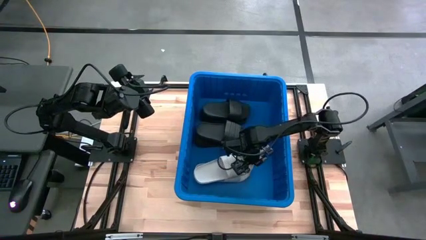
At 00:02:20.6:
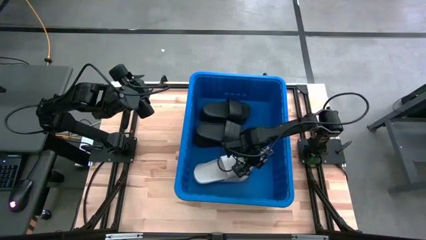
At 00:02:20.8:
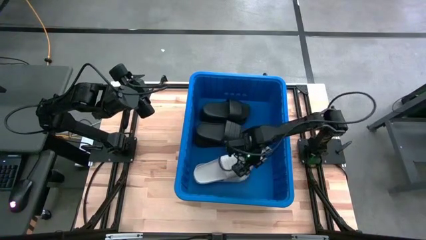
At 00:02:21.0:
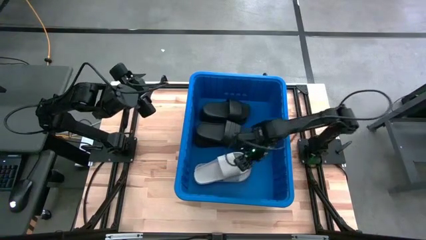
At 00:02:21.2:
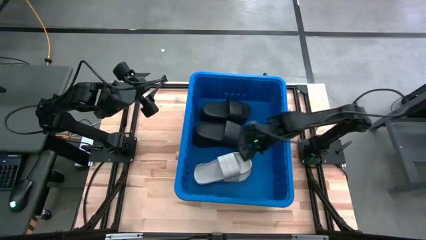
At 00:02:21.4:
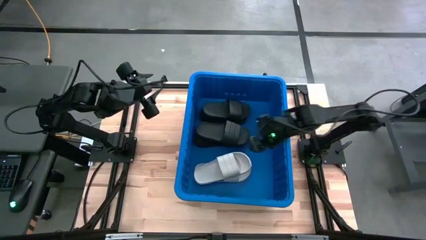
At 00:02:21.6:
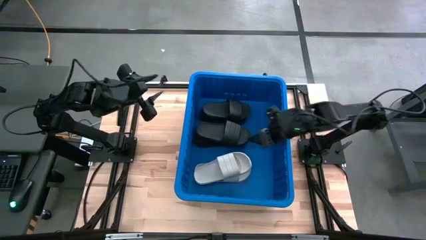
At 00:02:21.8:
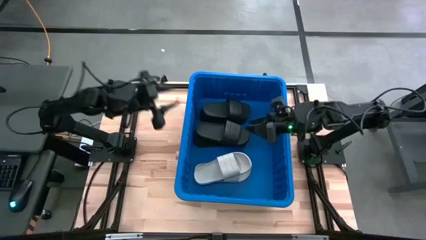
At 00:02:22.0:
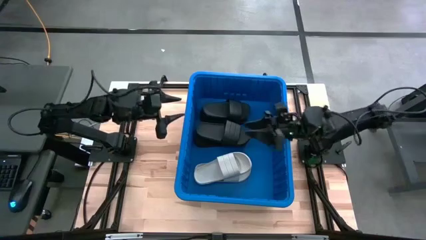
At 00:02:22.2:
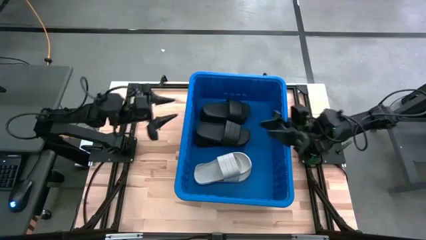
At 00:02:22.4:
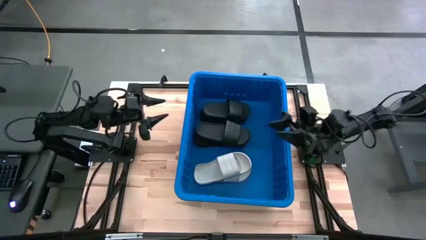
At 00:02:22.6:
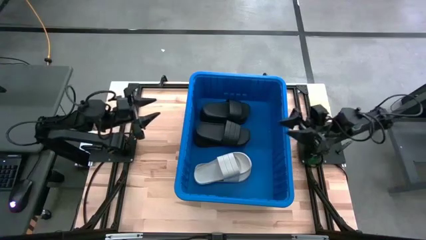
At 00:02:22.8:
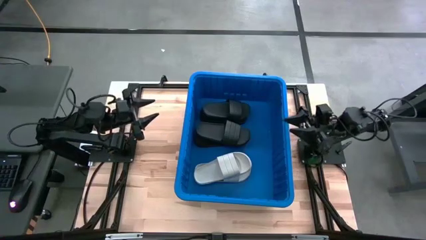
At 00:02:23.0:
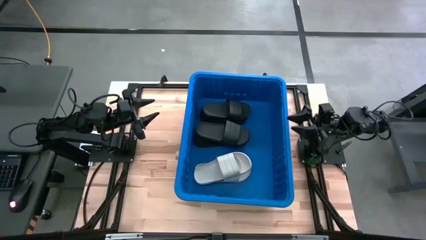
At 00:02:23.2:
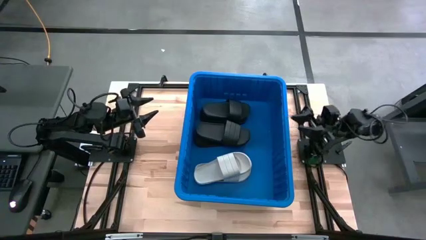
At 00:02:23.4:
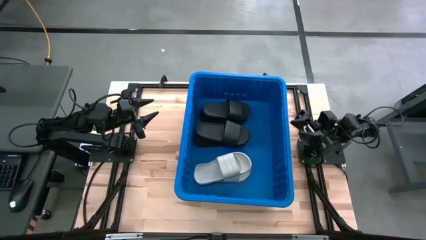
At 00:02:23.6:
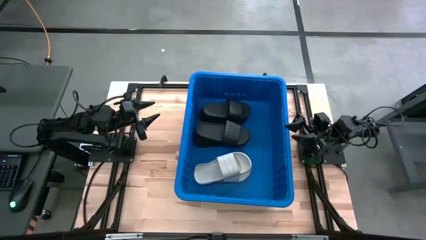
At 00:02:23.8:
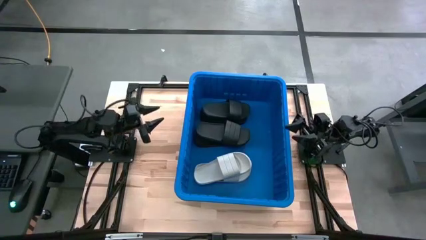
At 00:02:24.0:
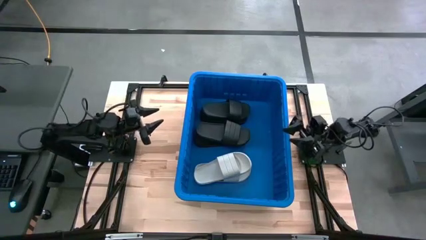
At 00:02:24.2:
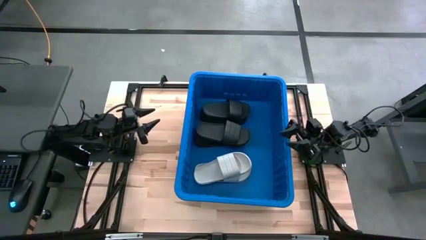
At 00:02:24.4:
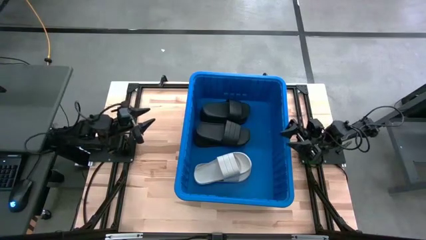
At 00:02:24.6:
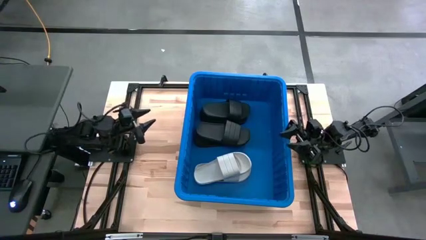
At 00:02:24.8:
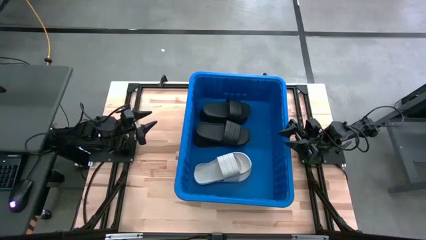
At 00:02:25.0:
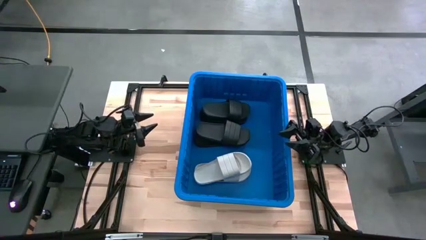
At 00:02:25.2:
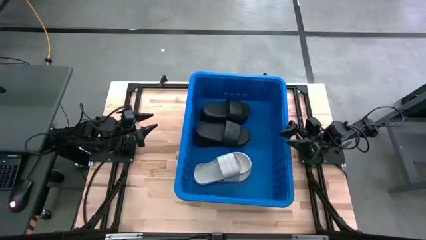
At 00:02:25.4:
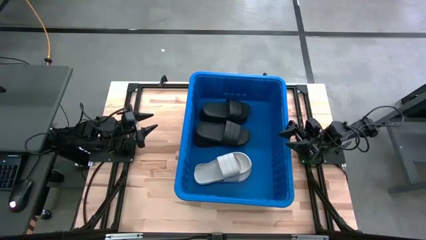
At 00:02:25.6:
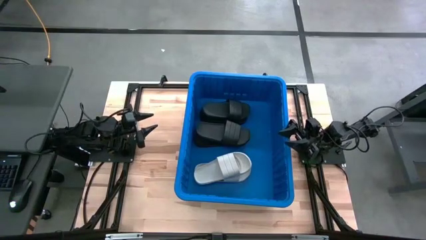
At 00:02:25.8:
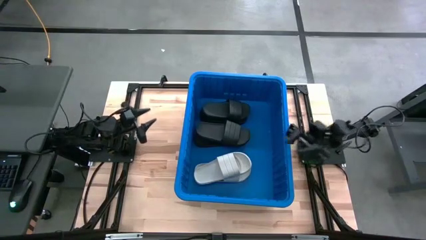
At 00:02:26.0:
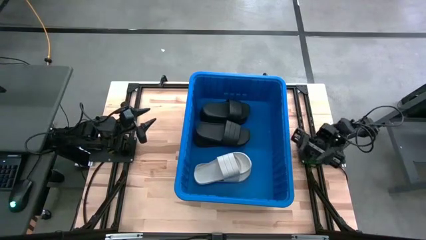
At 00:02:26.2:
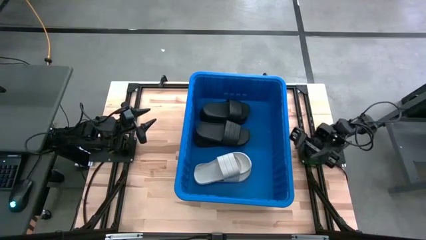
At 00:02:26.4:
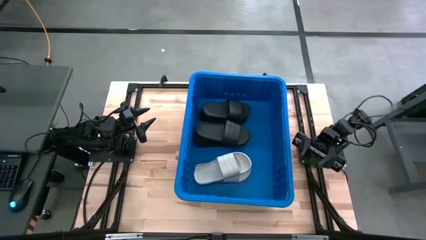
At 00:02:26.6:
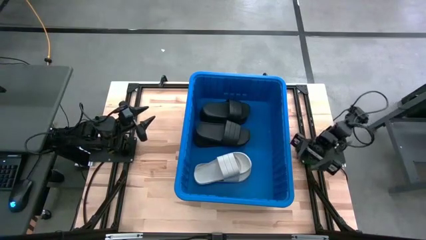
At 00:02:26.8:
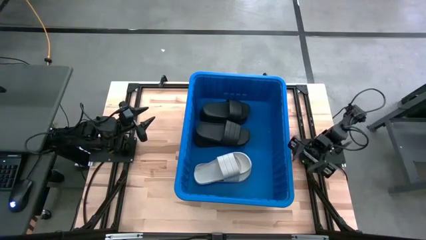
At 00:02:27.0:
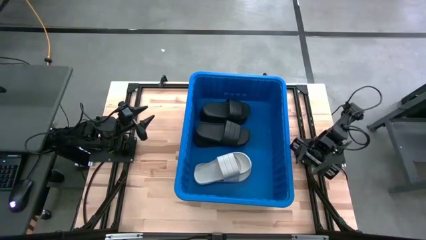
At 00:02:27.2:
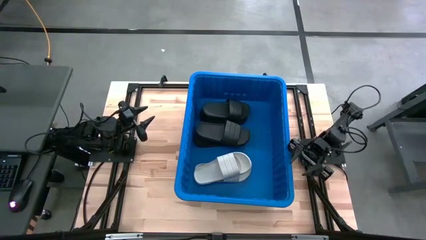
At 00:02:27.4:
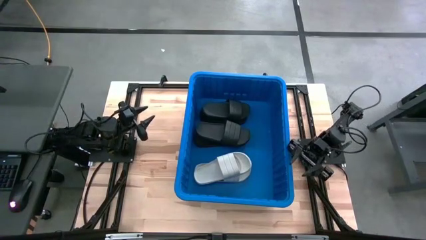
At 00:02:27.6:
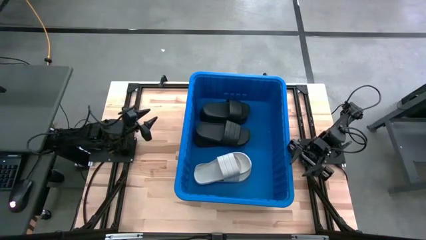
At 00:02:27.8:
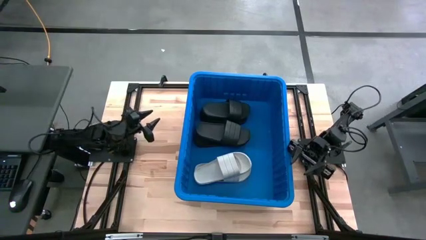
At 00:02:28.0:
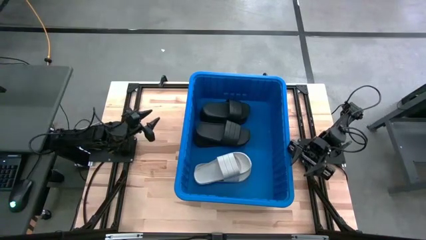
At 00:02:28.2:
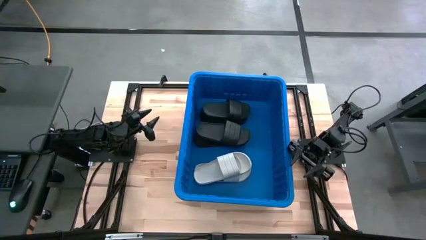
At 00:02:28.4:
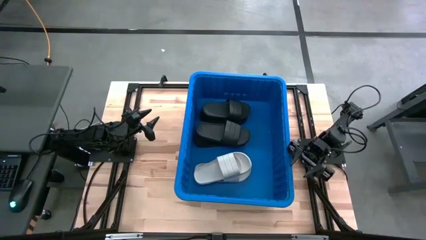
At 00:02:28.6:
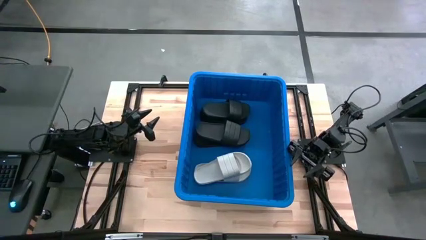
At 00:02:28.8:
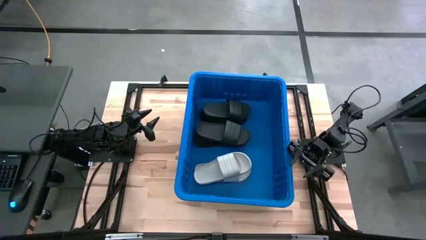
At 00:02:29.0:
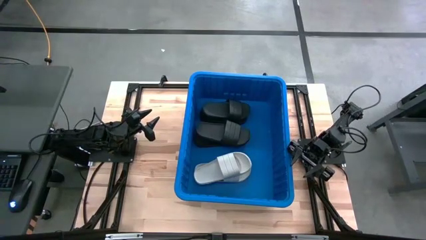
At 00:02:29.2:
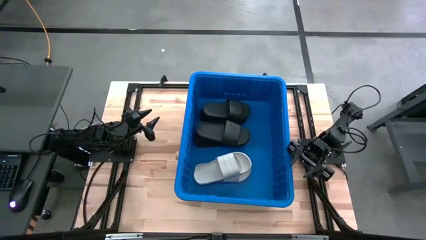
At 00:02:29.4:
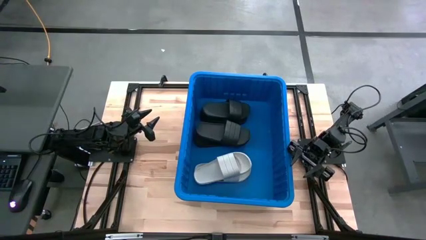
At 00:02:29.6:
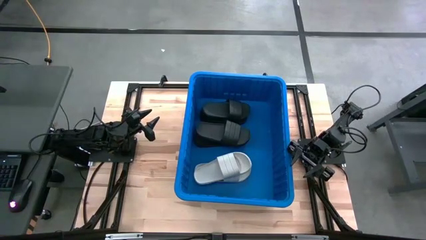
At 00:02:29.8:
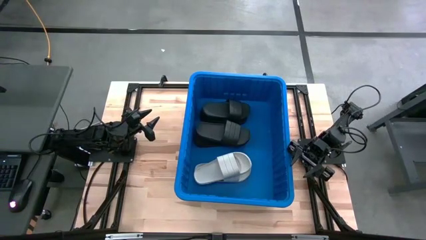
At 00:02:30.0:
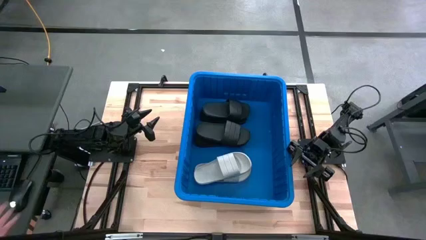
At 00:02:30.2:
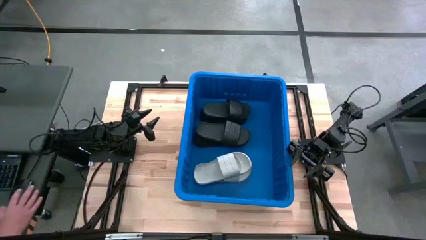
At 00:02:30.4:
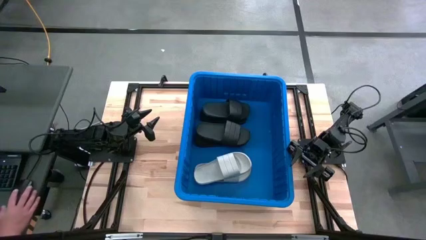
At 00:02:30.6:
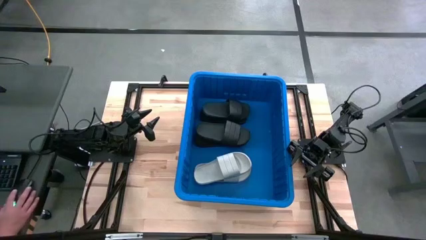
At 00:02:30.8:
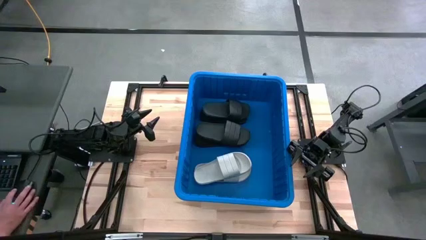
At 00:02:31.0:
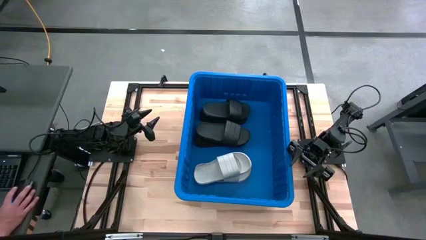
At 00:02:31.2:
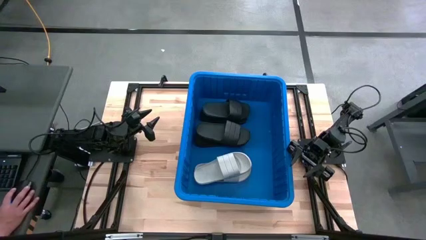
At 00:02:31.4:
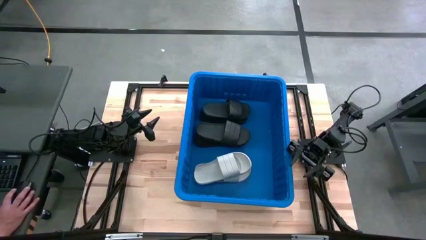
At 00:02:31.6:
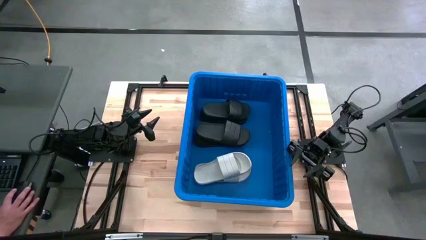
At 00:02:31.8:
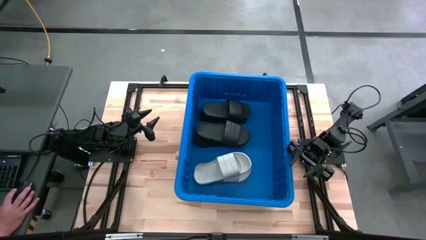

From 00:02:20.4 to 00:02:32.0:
Task: Pick and place slides into bin
Return to Home Position

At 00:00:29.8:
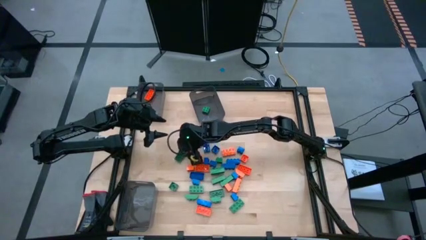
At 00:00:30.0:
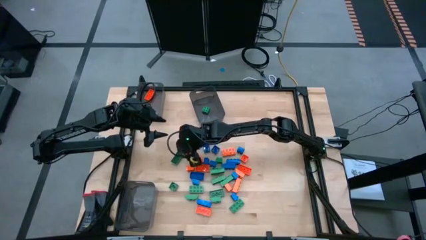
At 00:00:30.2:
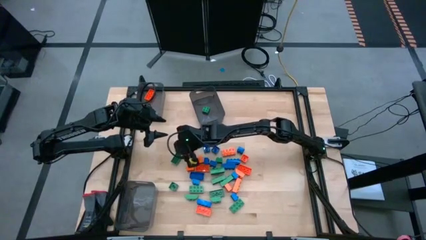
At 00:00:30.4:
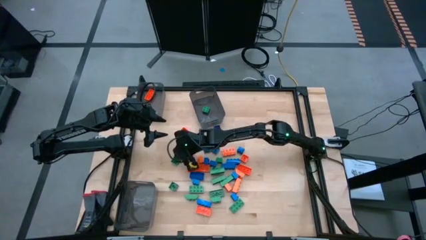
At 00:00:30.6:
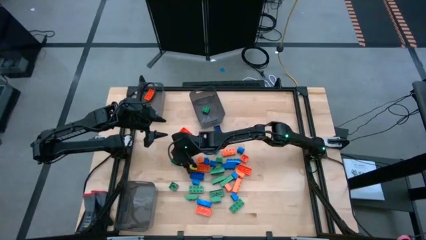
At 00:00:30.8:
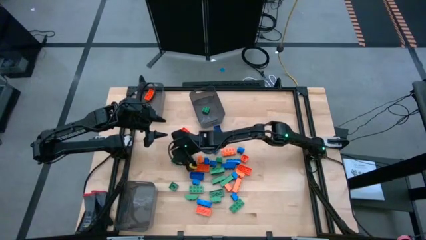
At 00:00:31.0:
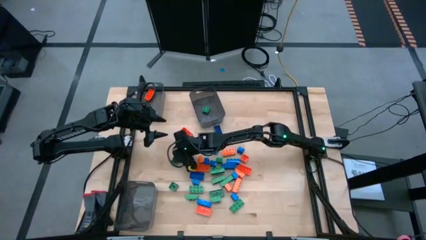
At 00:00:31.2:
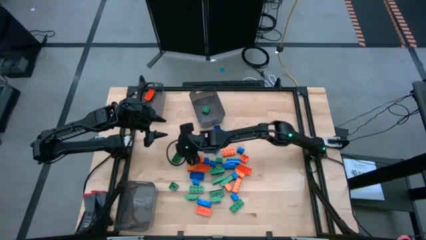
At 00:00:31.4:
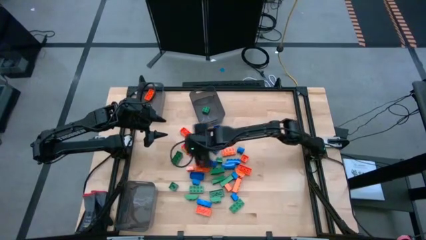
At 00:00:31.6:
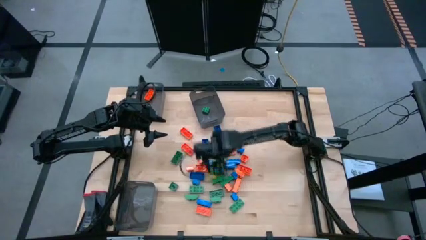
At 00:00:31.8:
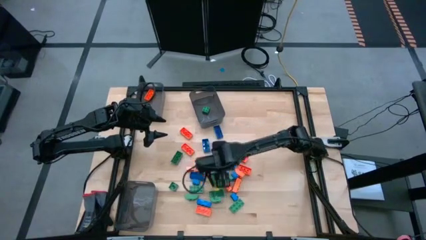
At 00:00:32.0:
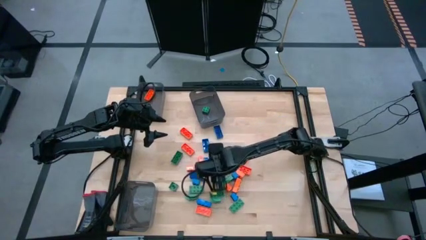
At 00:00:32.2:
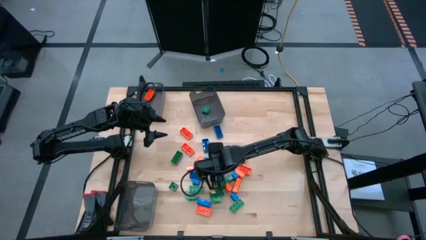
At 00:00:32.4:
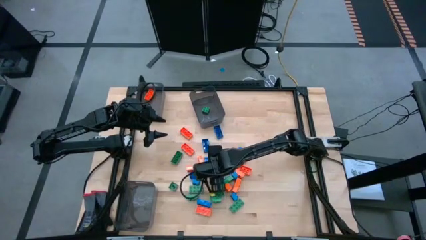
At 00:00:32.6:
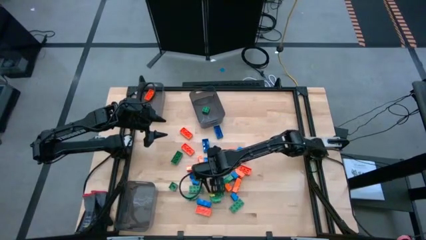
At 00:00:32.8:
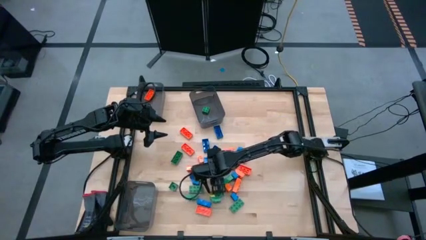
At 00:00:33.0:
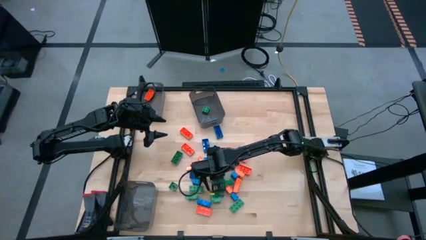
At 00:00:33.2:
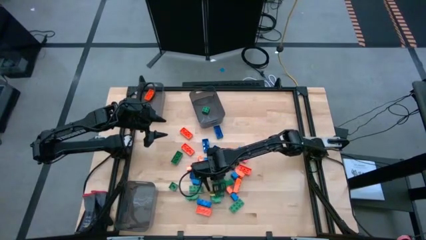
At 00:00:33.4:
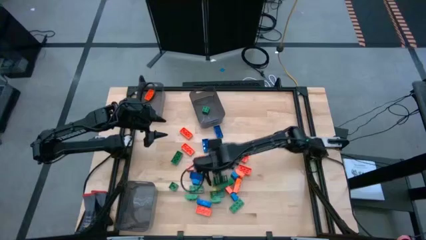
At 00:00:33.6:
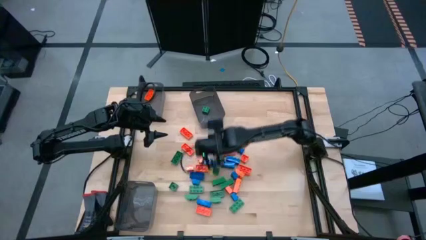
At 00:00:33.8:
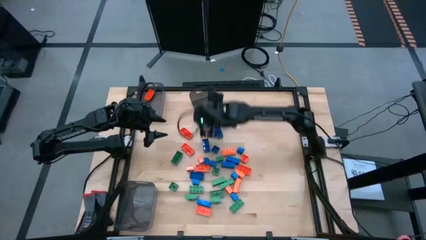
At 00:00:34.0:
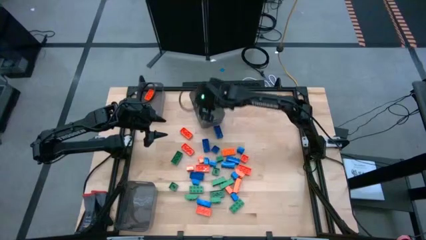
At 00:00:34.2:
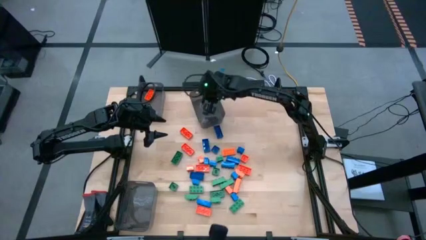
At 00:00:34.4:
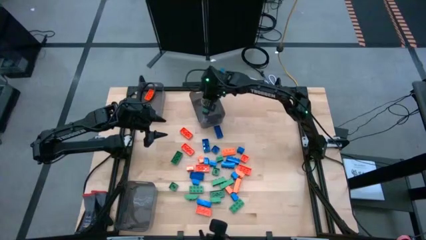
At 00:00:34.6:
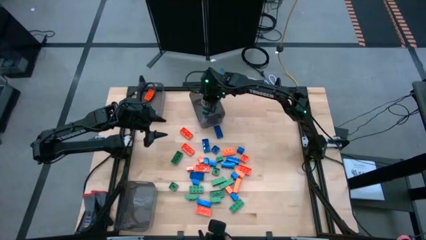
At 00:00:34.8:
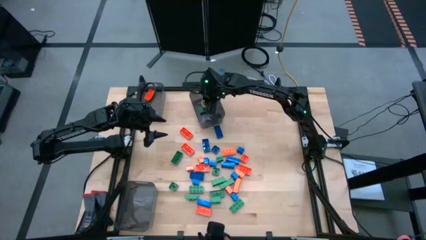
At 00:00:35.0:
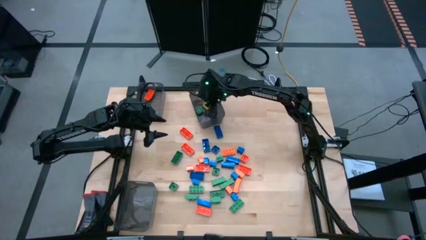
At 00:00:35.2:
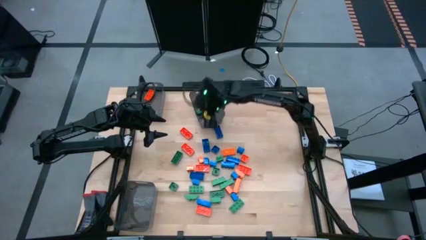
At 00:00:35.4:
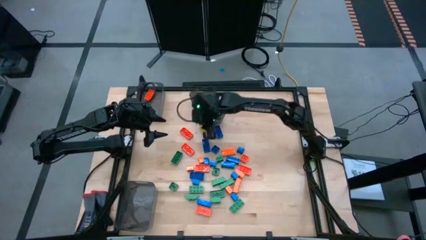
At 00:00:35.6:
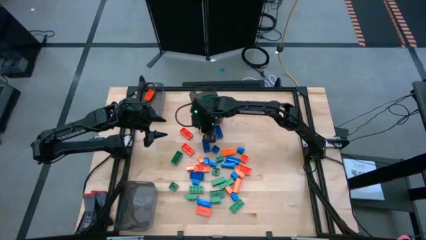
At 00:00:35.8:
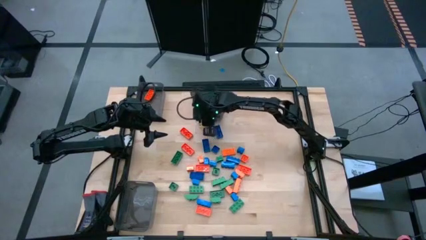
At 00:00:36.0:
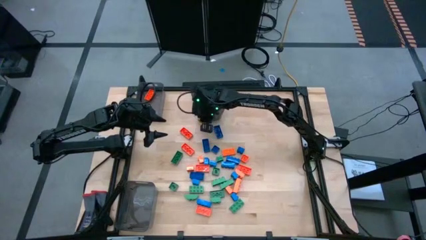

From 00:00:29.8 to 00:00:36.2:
Task: Sort blocks
Put the green game piece into the top right black transparent bin
